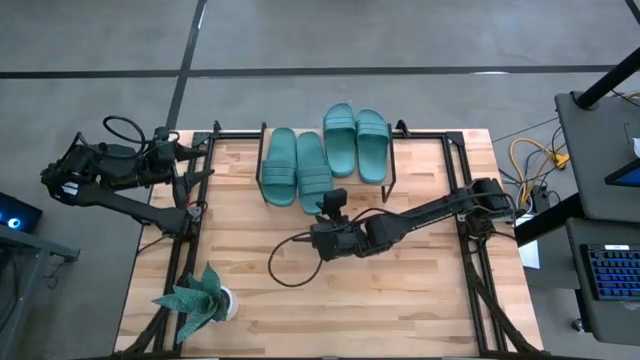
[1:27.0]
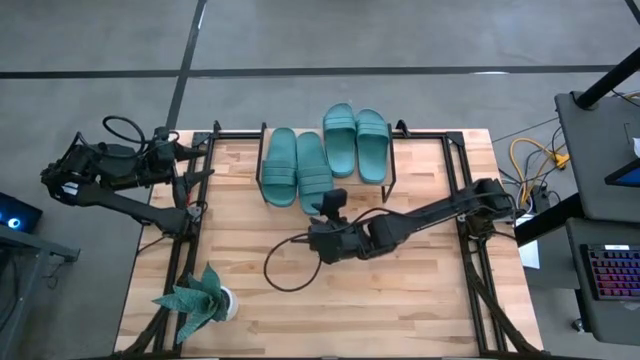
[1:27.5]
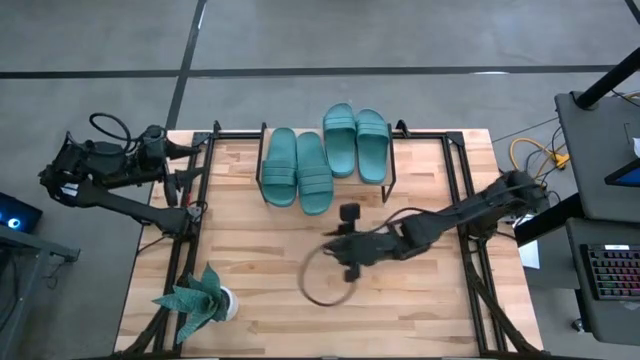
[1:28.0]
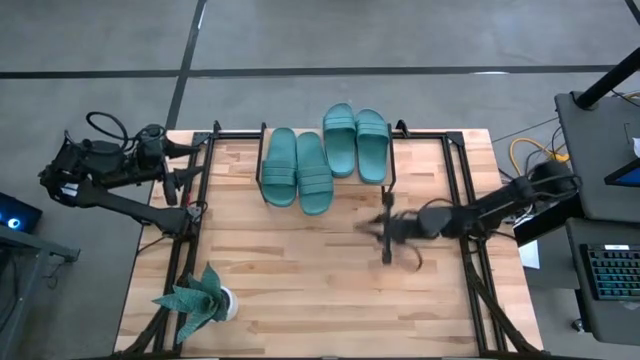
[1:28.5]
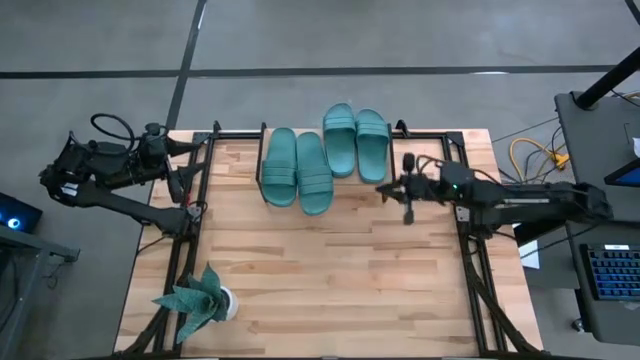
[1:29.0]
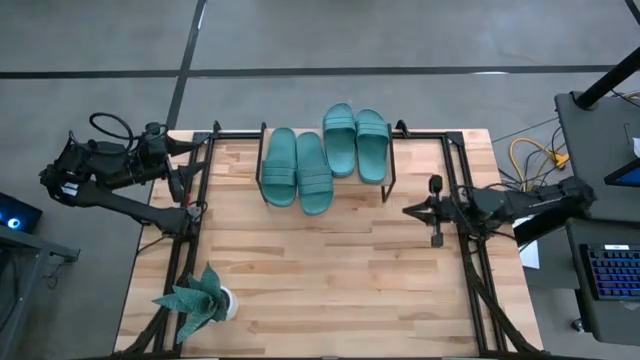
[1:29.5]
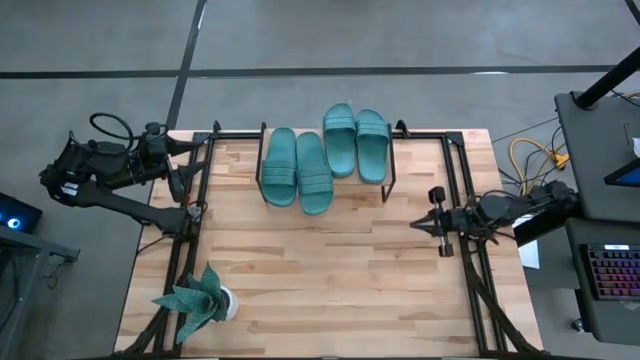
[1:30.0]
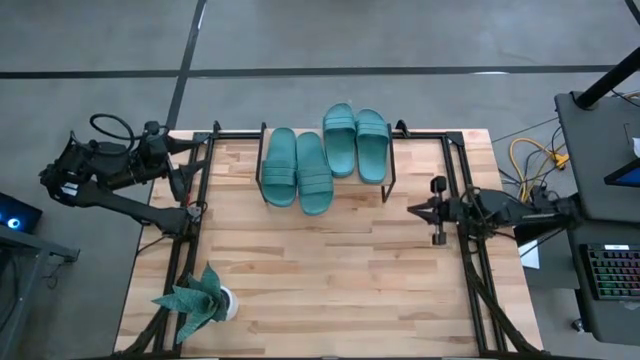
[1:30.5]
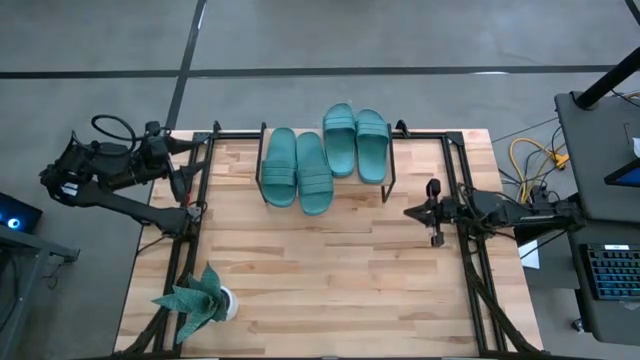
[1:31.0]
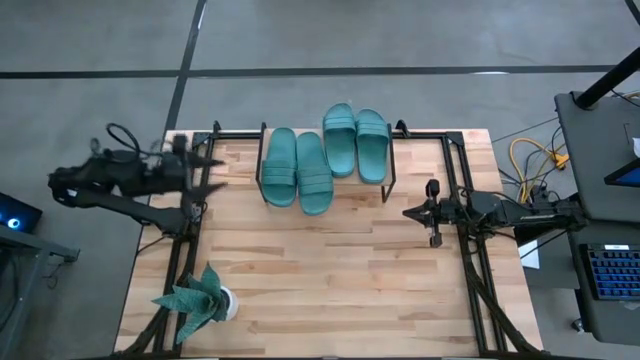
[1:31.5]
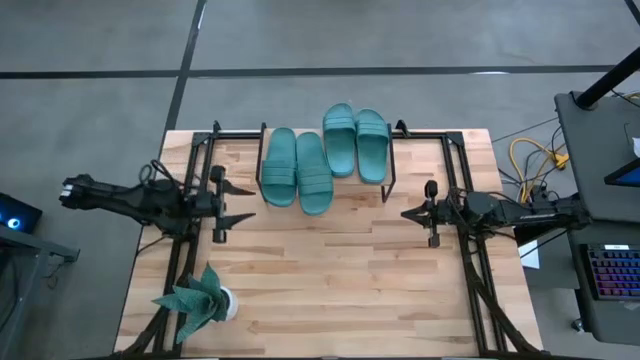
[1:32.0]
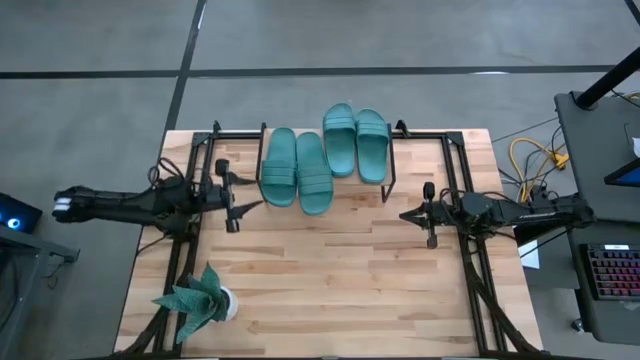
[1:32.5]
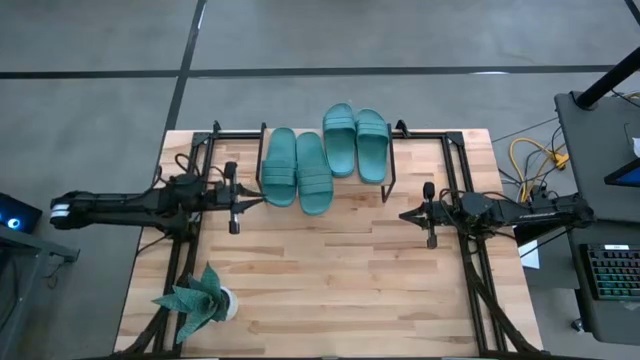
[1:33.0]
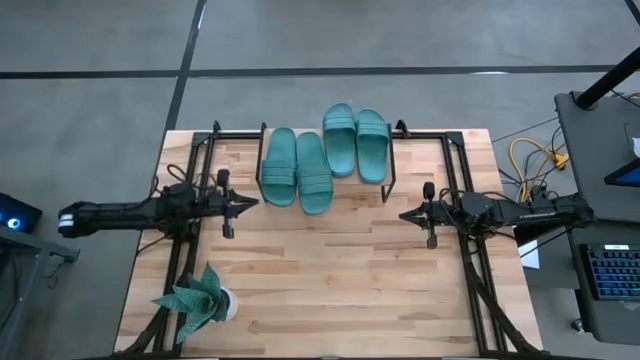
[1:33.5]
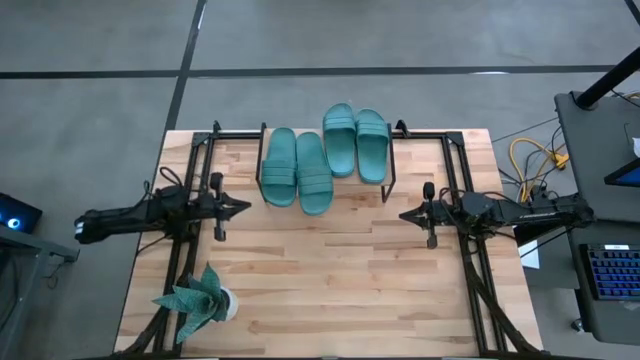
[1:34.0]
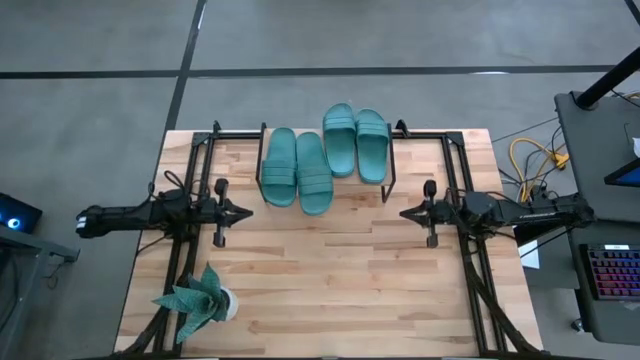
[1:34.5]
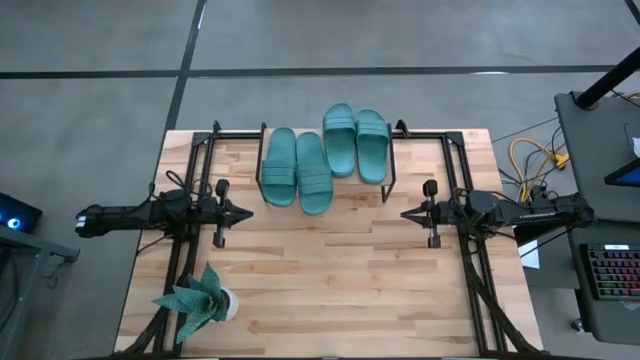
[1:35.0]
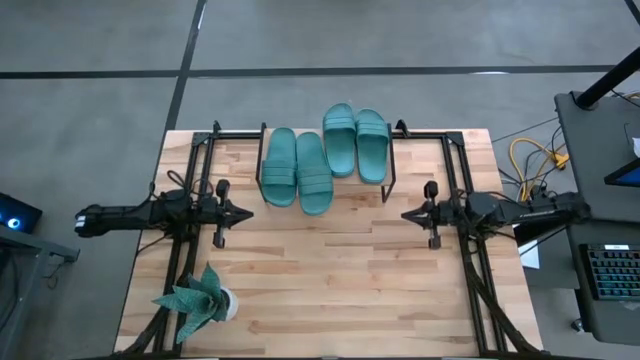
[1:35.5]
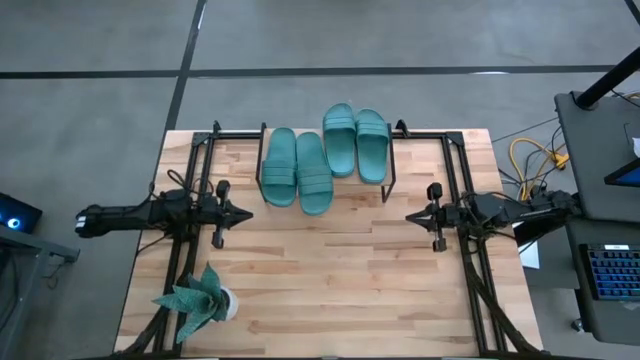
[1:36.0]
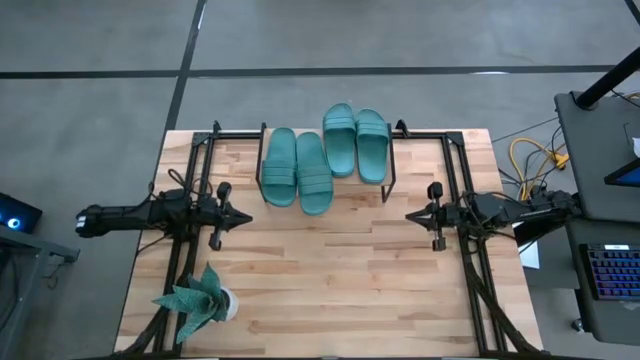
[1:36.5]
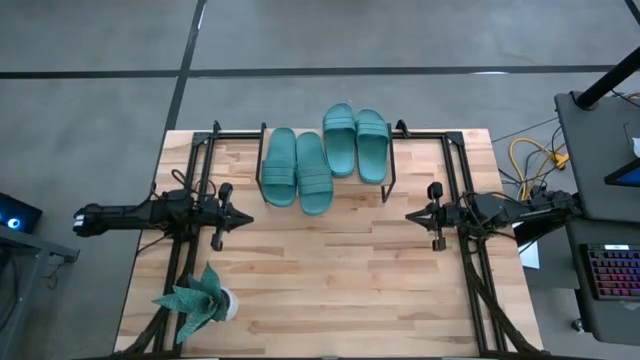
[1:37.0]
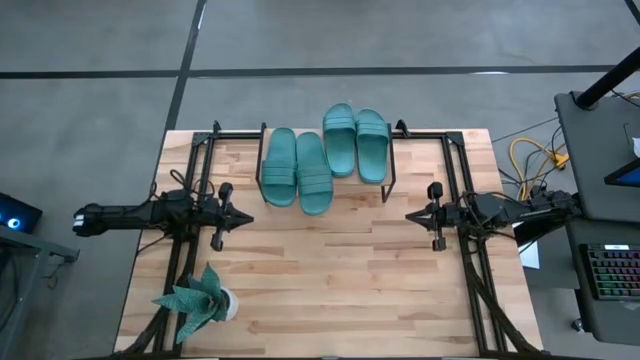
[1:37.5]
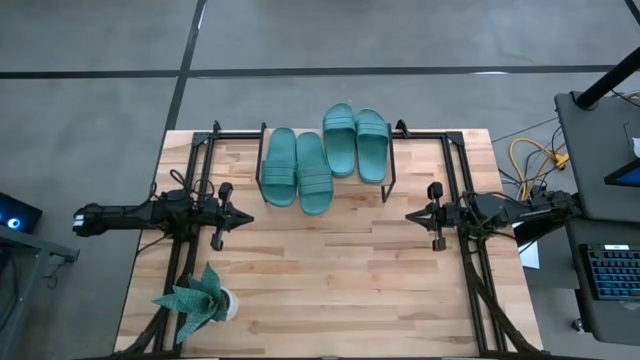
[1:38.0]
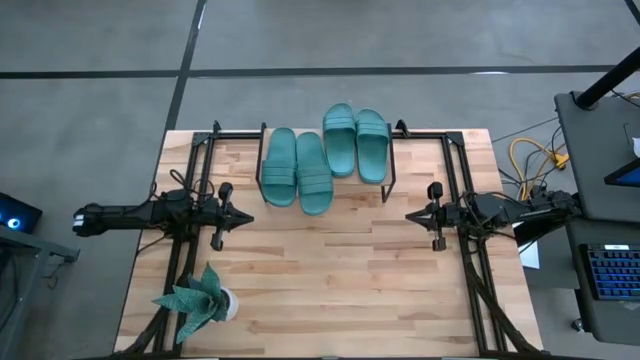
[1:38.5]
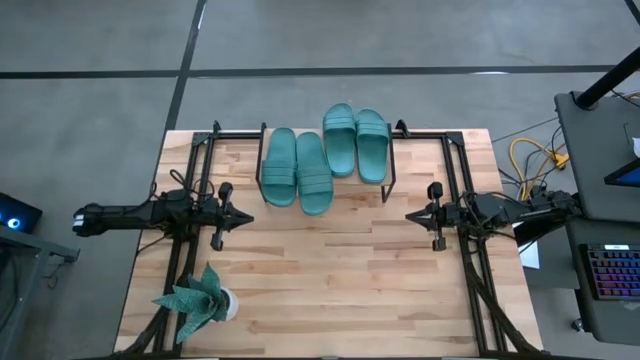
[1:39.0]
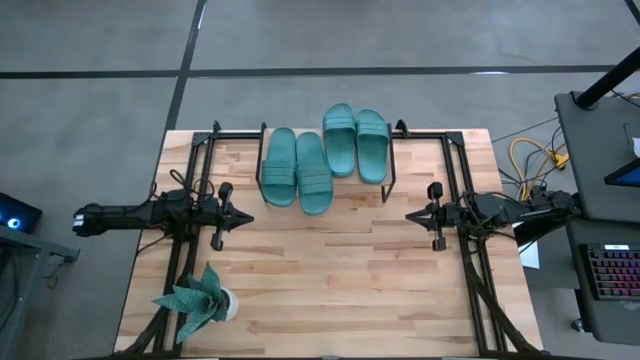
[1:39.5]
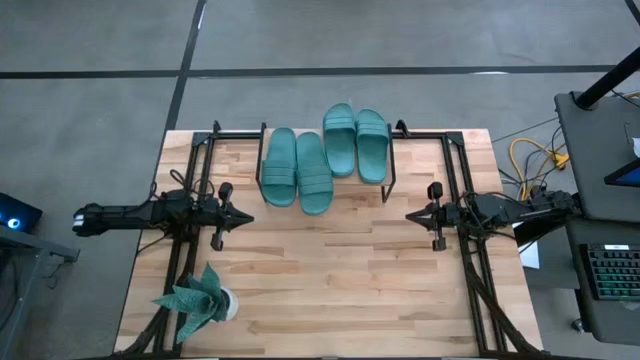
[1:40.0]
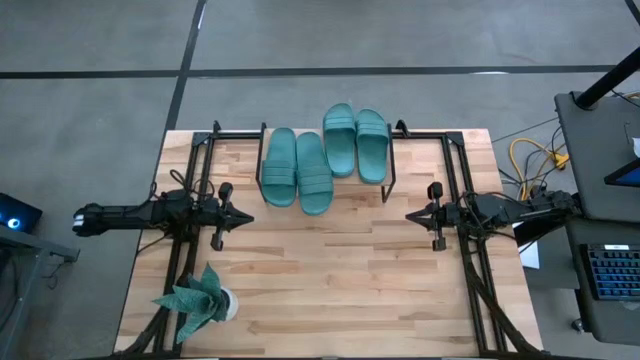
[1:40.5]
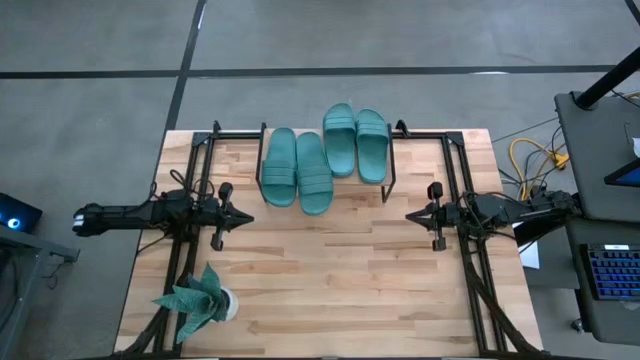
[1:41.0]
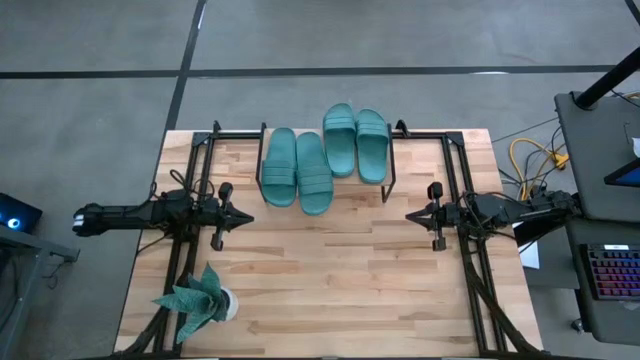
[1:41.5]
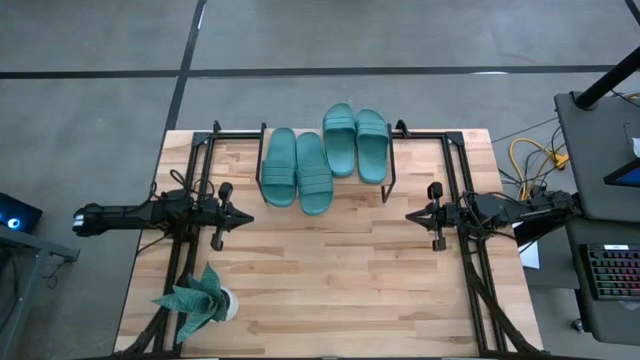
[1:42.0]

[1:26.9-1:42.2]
Task: Pick and place slides into the shelf
Return to Home Position

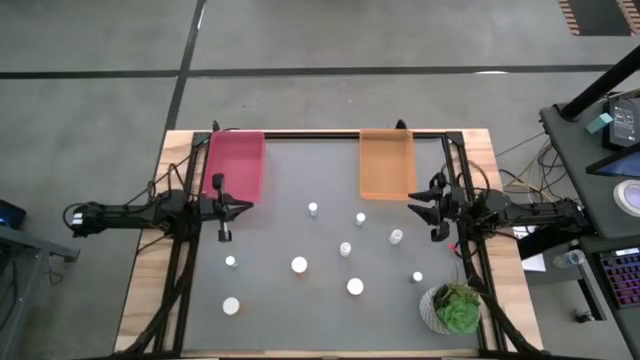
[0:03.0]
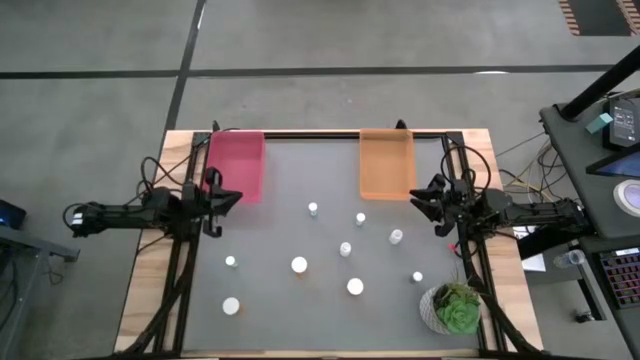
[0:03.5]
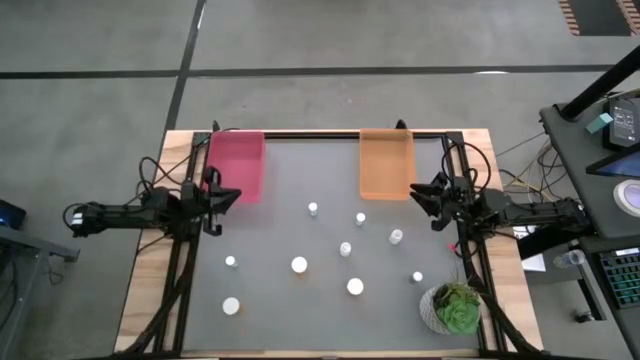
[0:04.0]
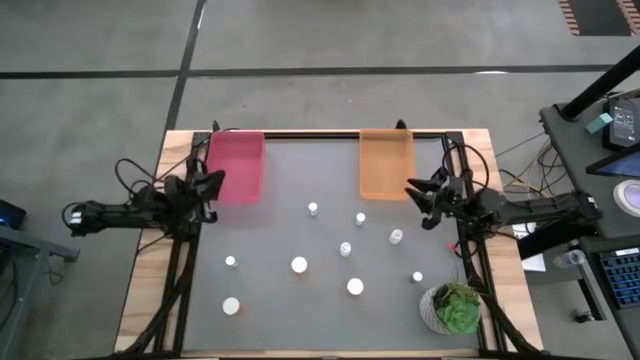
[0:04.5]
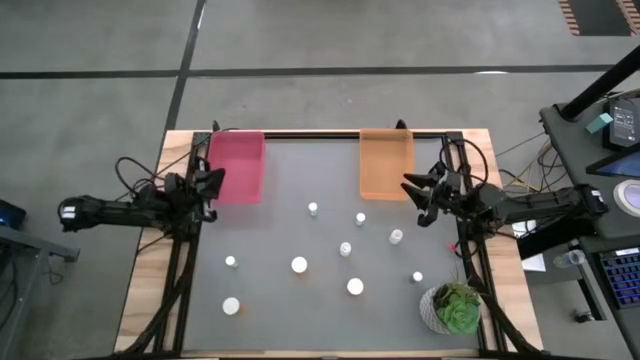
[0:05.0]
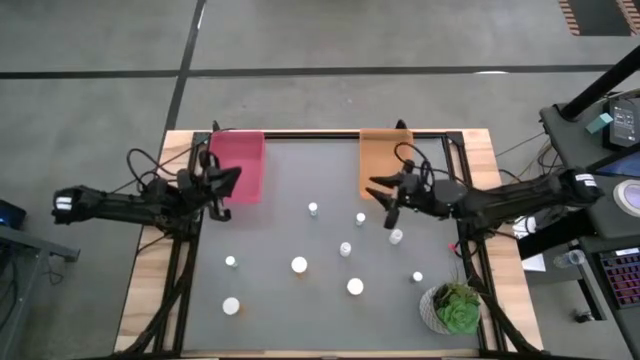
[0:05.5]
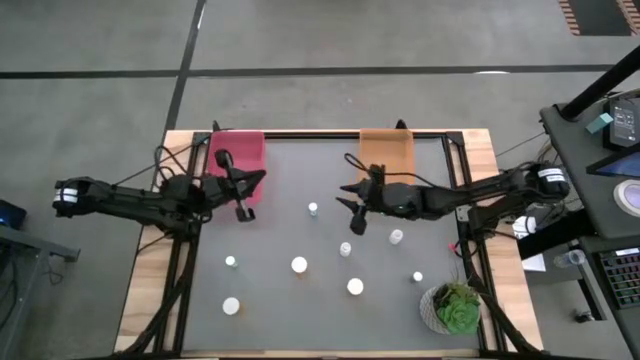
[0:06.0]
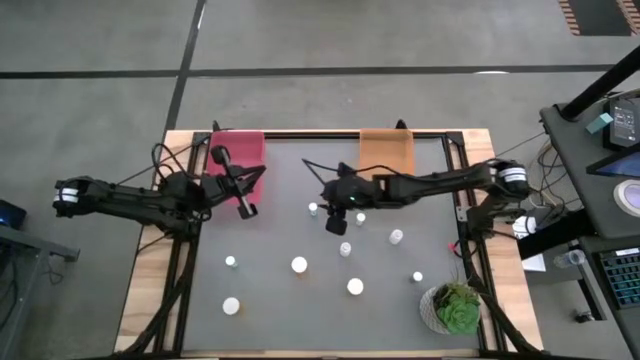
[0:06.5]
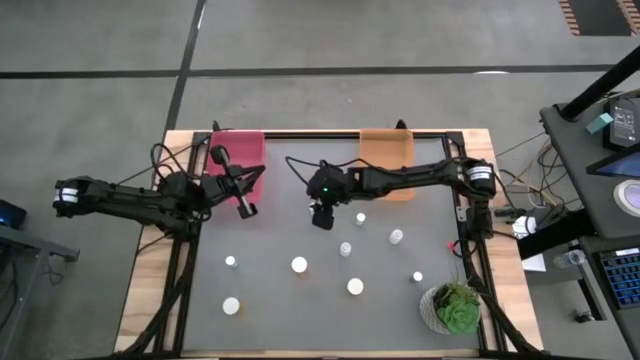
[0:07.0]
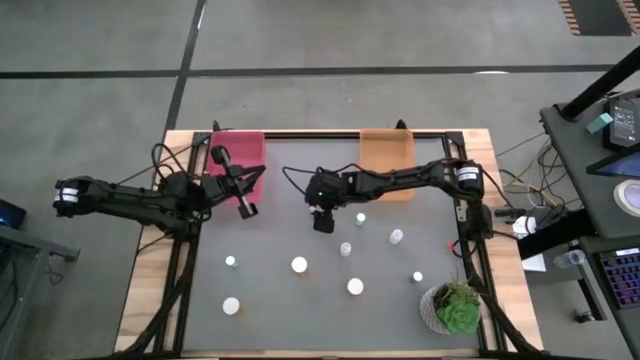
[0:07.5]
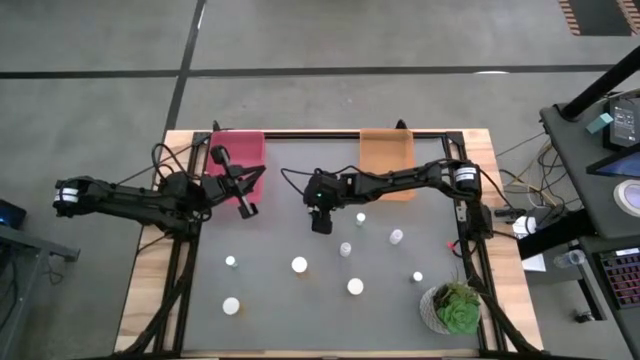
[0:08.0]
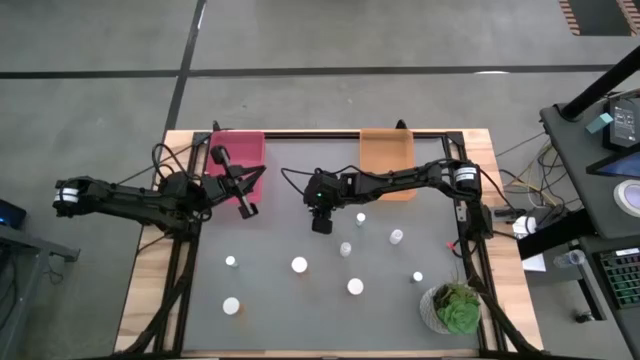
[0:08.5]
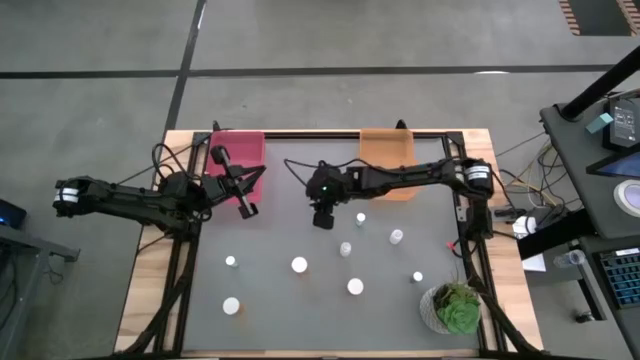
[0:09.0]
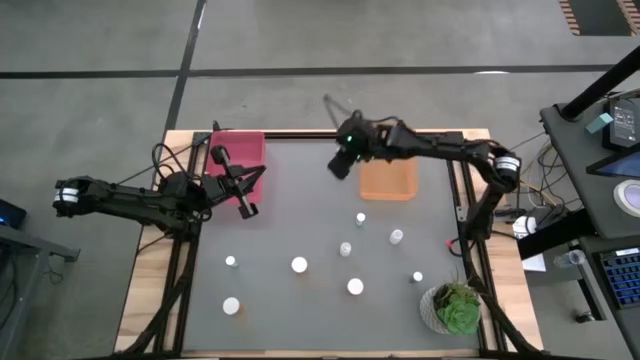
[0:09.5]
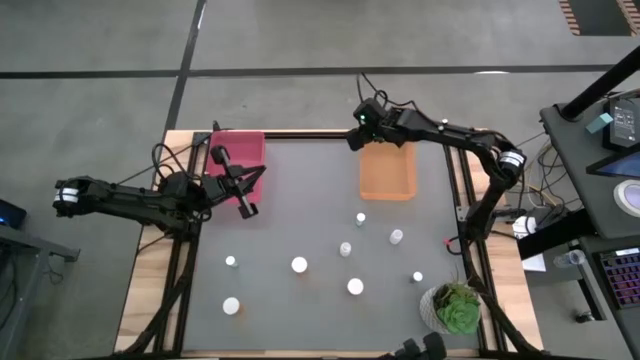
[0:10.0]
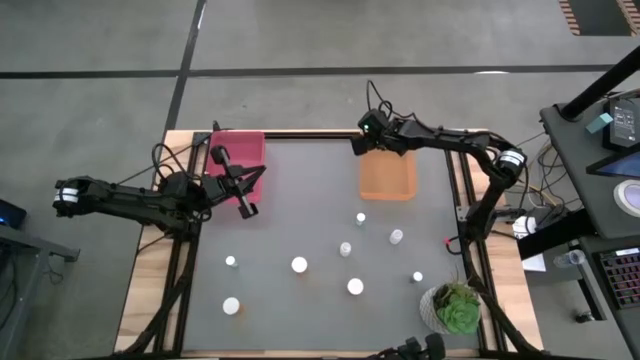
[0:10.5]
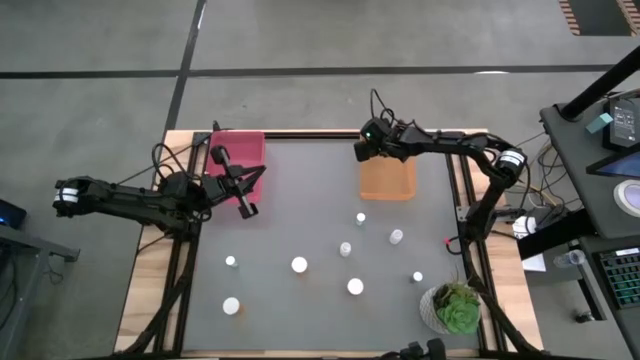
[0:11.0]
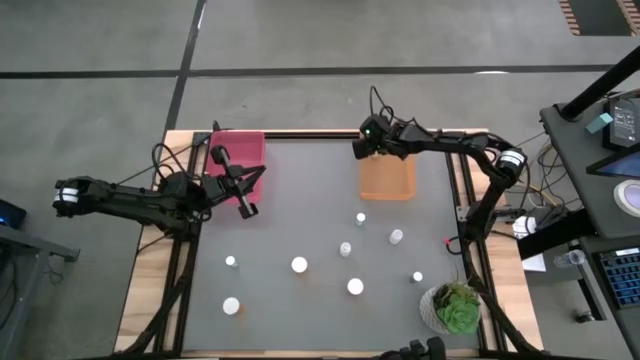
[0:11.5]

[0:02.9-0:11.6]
Task: Pick and place medicine bottles into bin by pill shape (circle, oval)
Put the top middle blue tablet bottle into the orange bin
